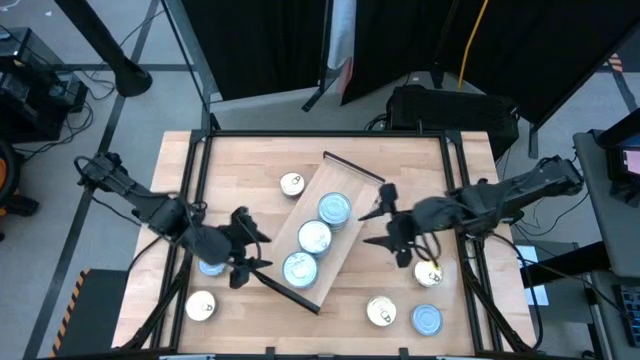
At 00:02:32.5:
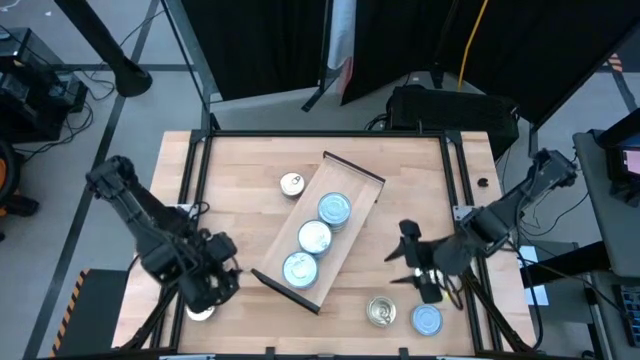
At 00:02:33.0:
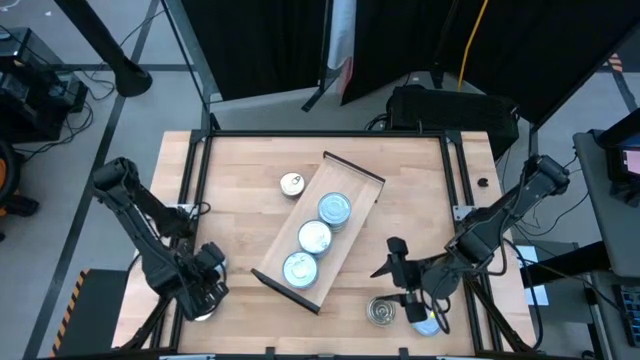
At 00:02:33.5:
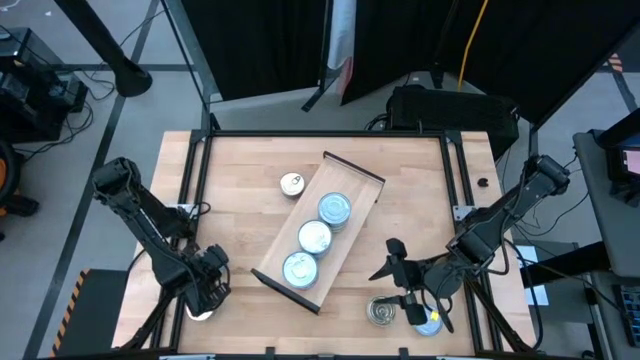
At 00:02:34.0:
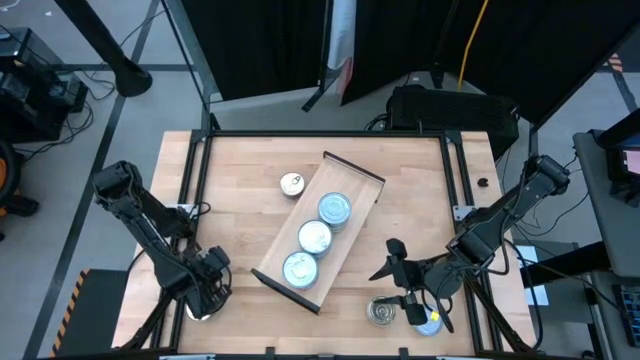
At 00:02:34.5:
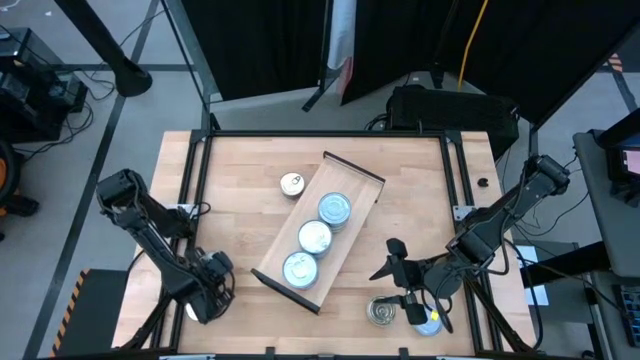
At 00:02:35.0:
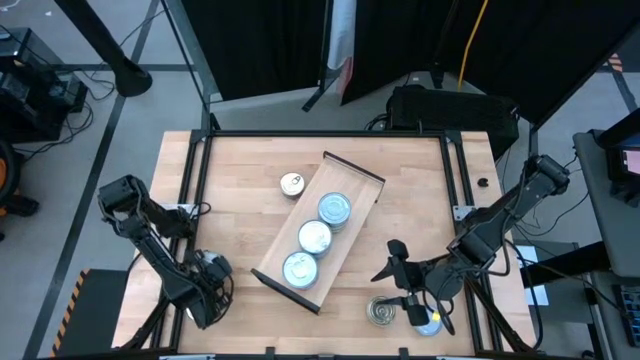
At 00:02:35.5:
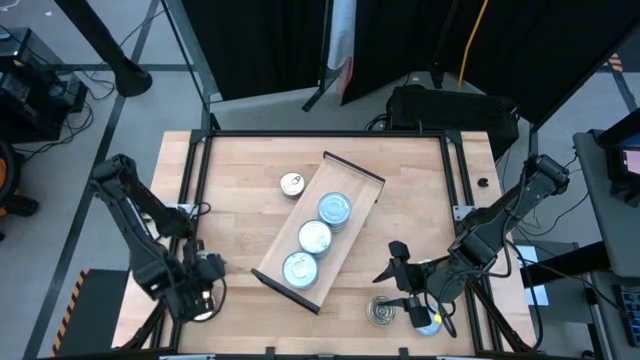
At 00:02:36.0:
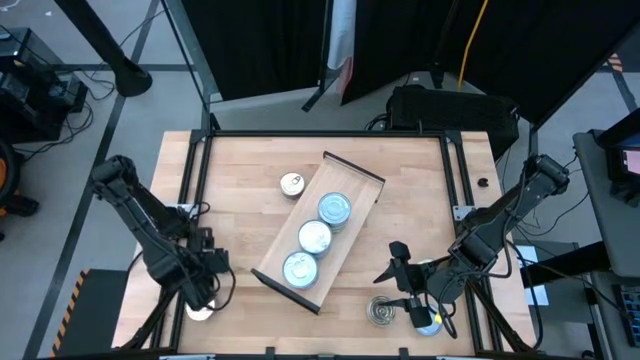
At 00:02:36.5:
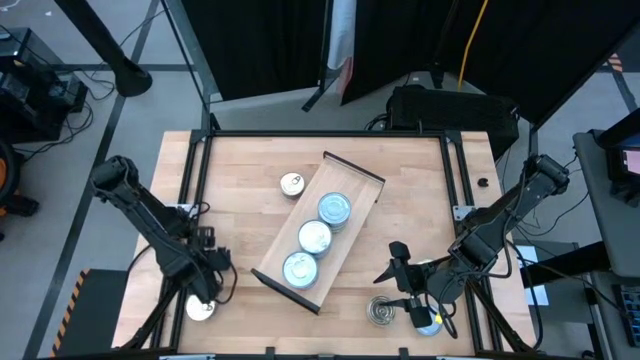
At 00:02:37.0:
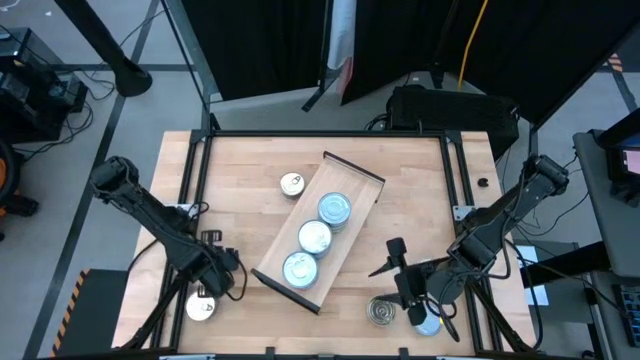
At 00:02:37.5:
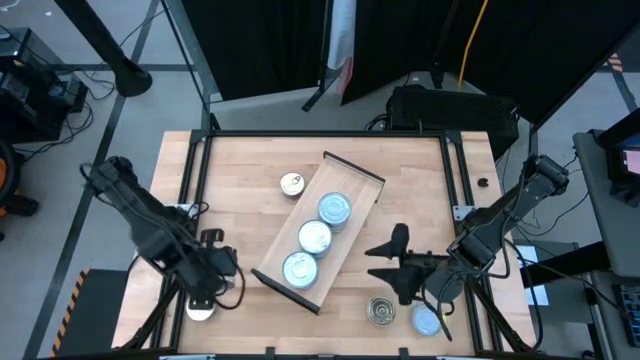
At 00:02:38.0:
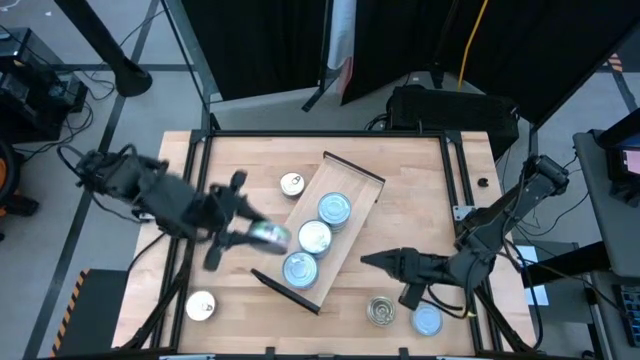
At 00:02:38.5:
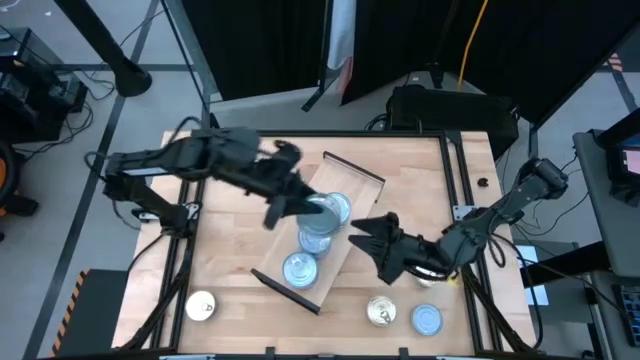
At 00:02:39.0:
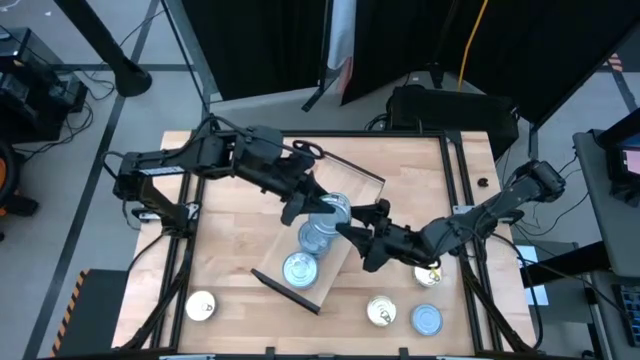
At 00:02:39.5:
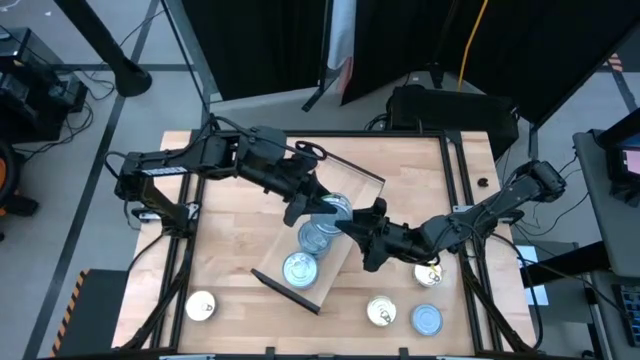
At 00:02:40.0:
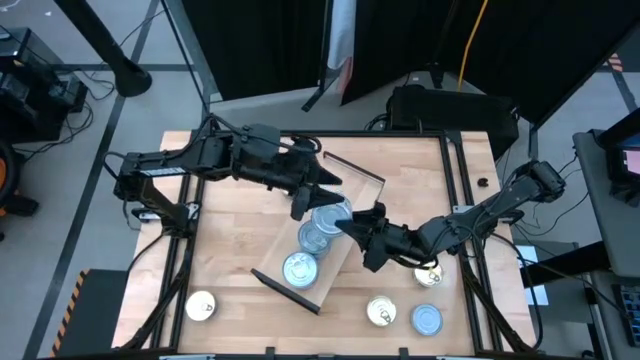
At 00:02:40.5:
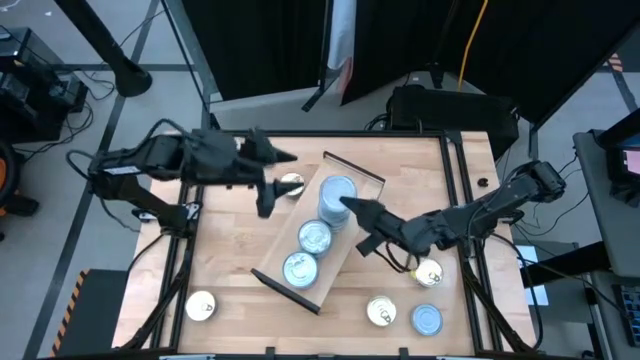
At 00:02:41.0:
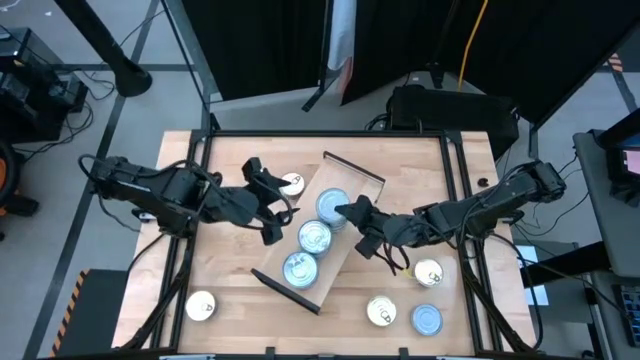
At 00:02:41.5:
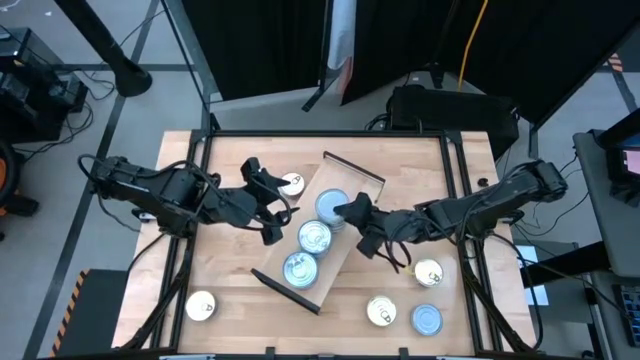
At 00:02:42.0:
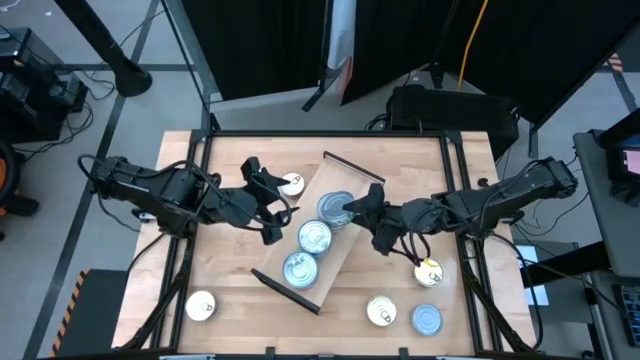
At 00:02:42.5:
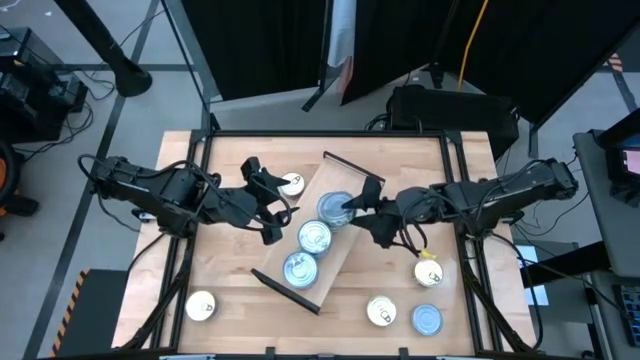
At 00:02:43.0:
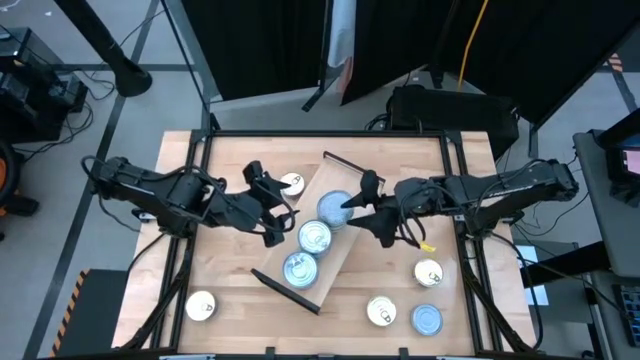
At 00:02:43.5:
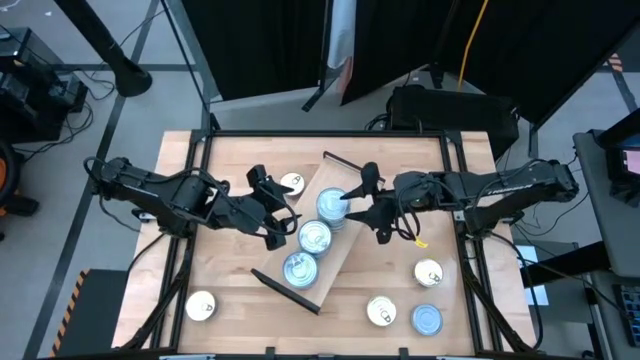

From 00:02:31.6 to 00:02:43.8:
Task: Stack canned seafood by type on shelf
Stack the green tuna can on top of the other green tuna can on the shelf

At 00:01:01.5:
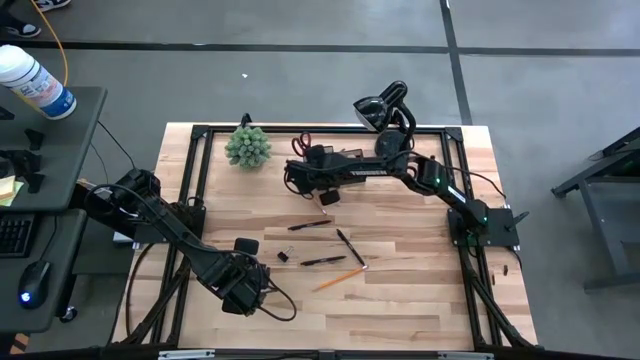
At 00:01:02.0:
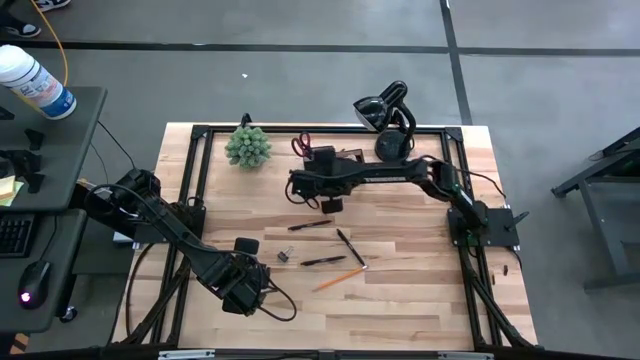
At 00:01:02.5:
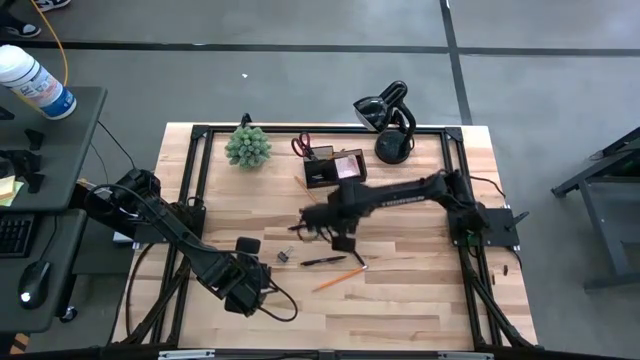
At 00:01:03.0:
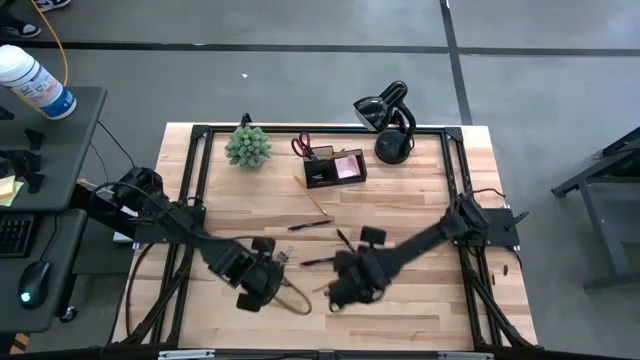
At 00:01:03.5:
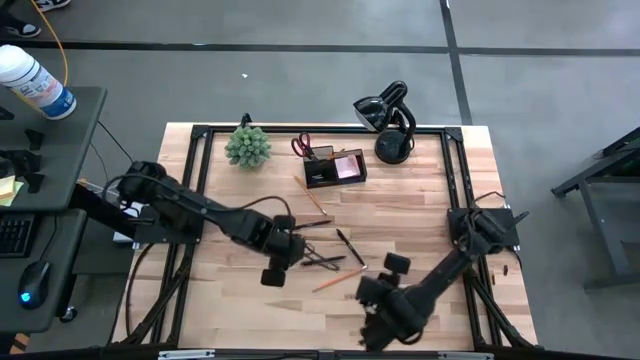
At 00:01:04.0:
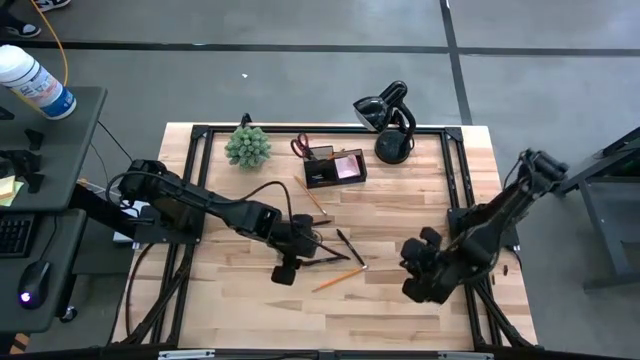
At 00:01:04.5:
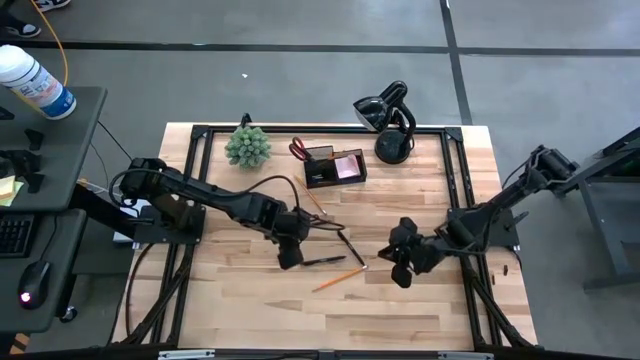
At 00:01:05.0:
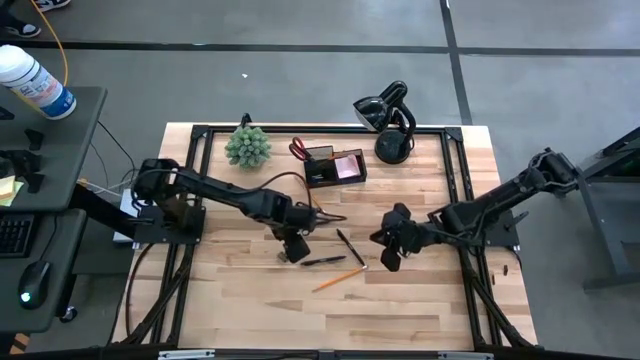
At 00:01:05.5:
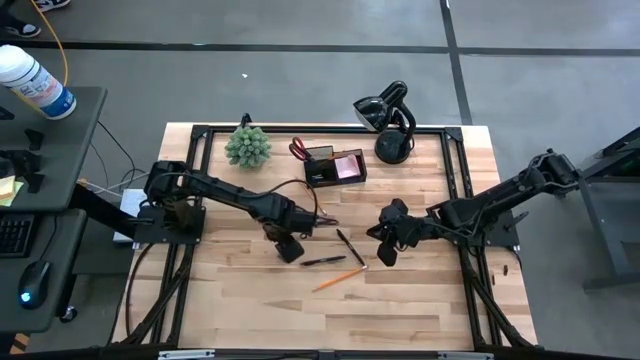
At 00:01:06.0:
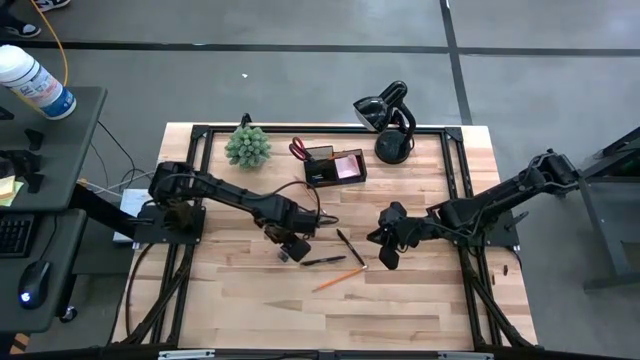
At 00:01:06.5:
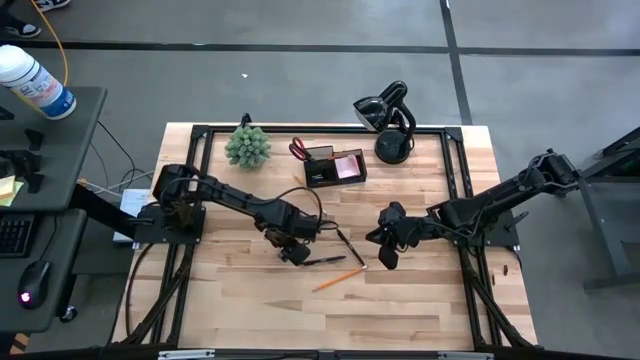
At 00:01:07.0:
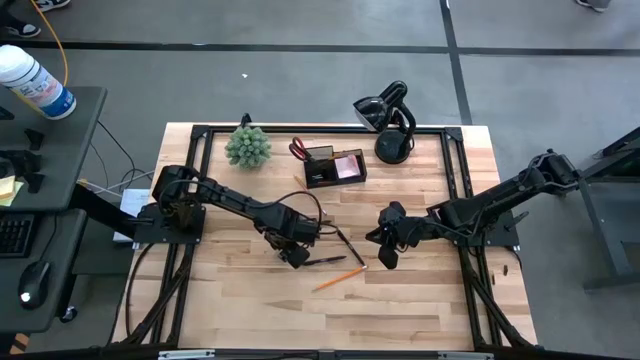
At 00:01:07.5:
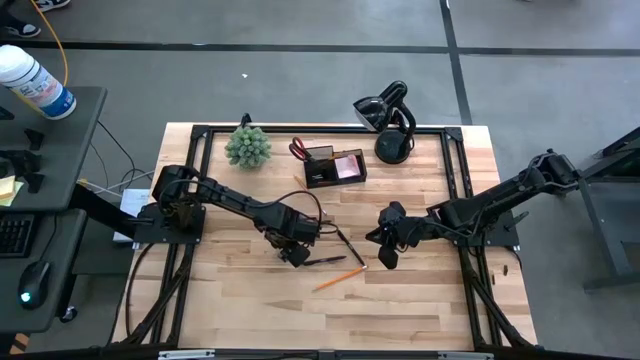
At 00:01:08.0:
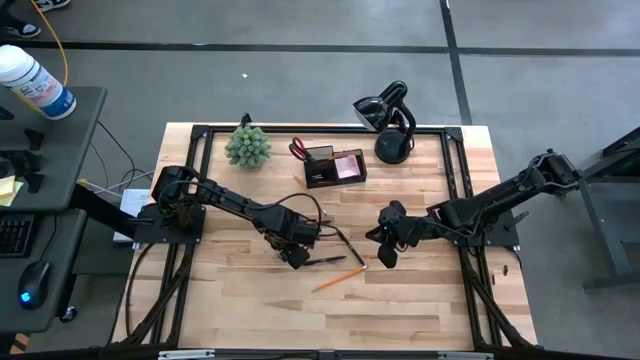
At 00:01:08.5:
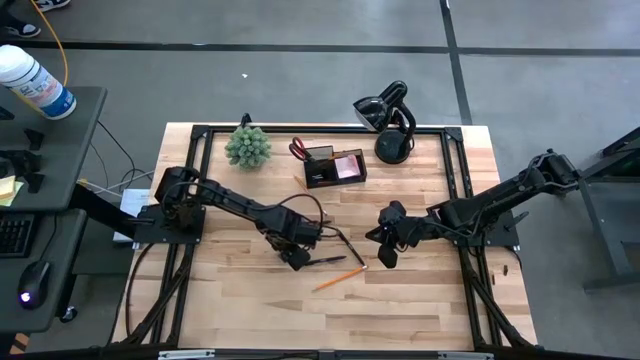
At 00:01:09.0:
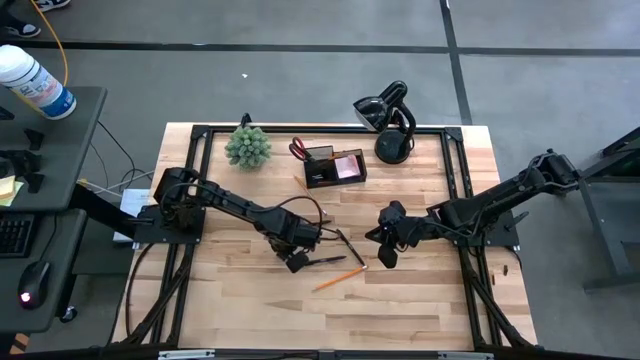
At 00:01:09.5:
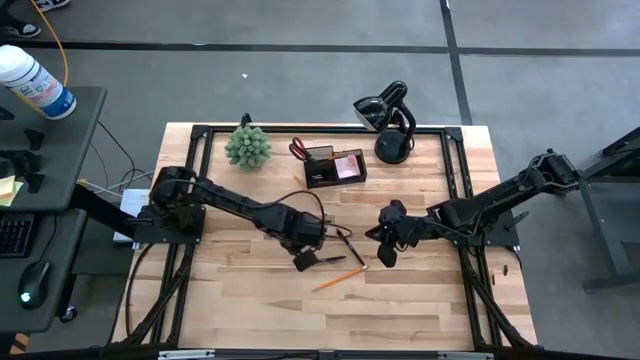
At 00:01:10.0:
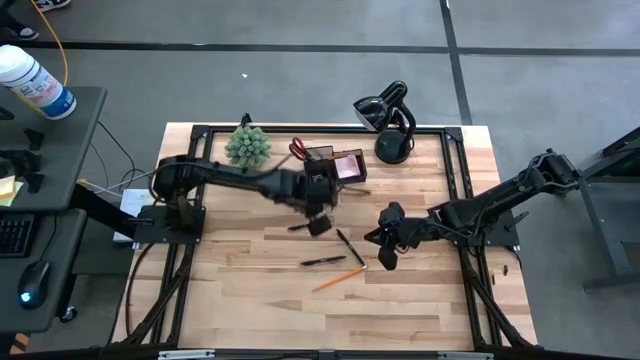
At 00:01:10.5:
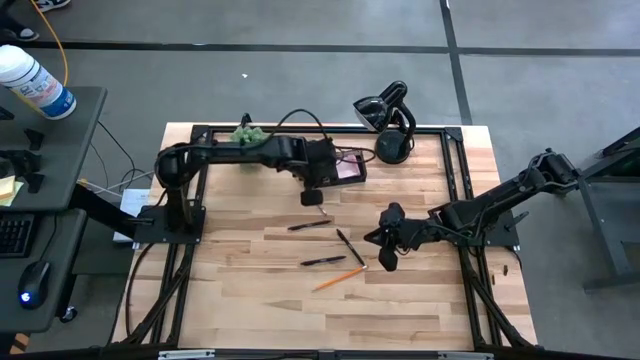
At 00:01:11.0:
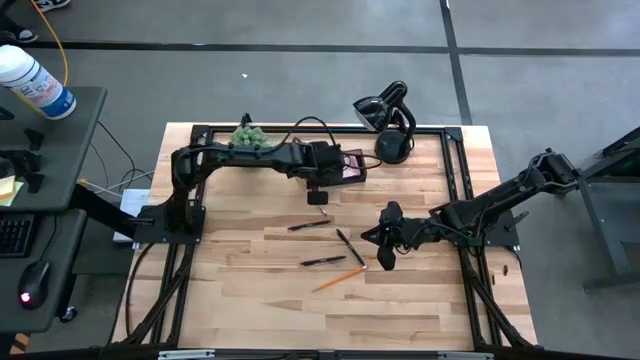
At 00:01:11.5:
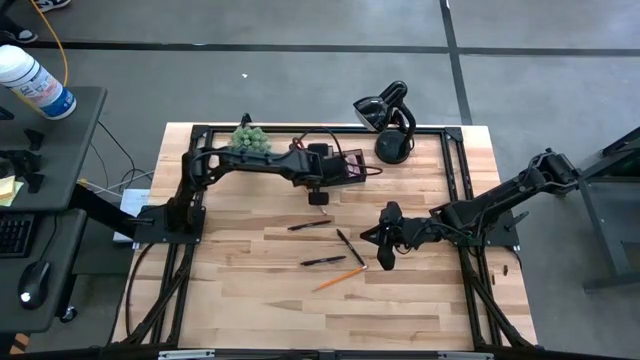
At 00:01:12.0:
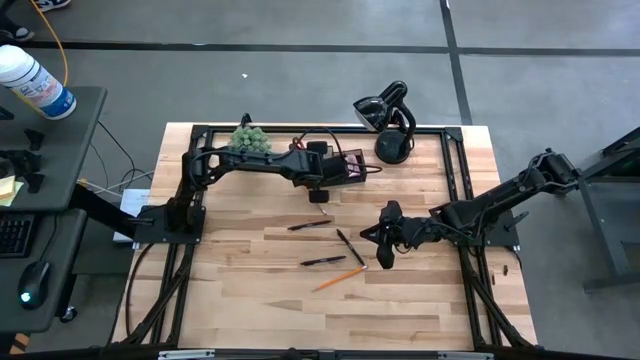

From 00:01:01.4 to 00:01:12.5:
Task: Pick and place office supplies into organizer
Put the black binder clip into the black desk organizer
